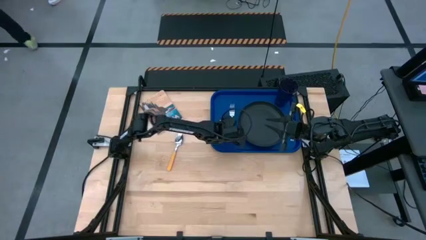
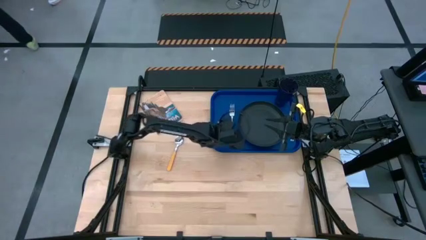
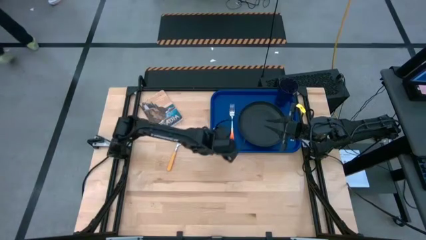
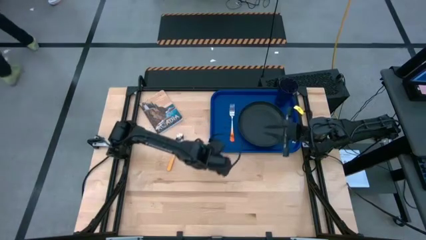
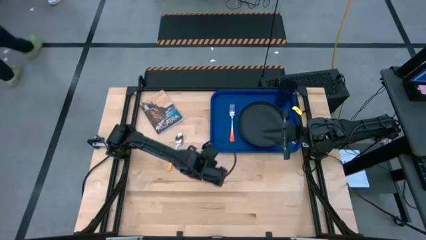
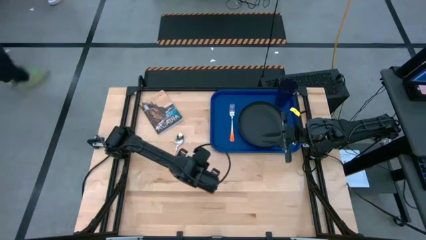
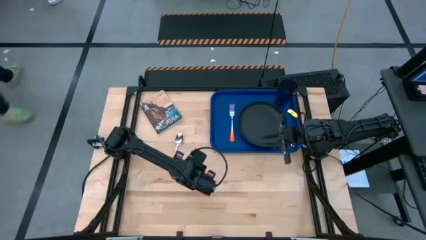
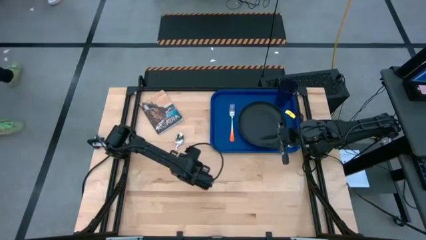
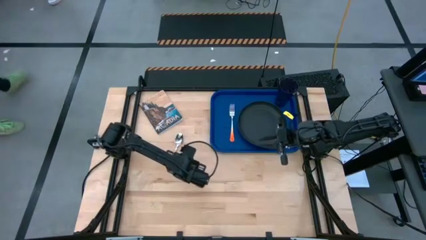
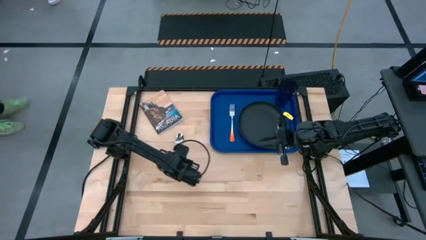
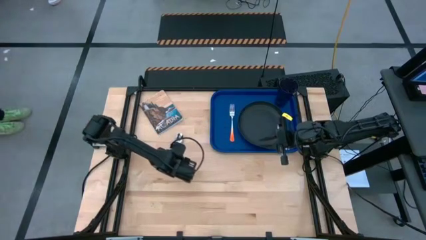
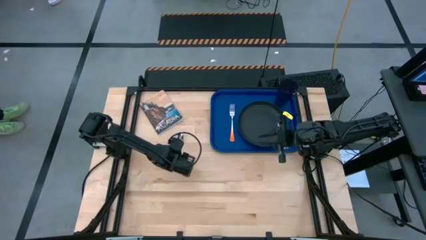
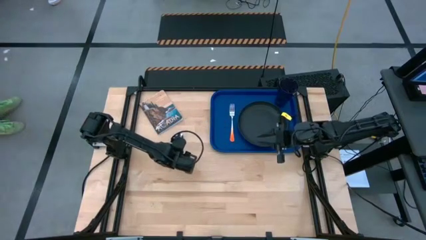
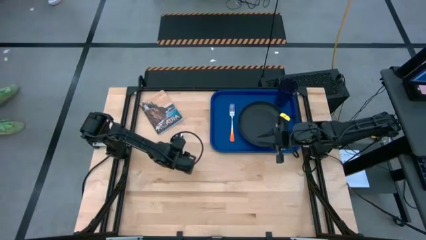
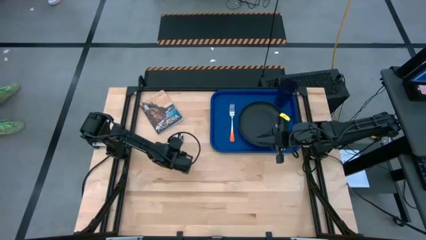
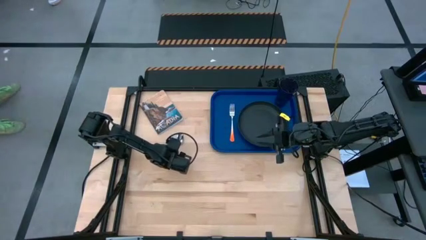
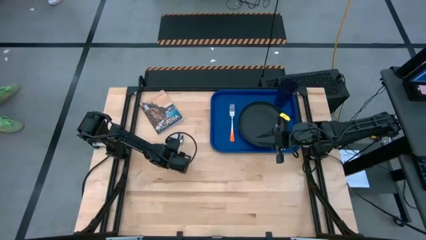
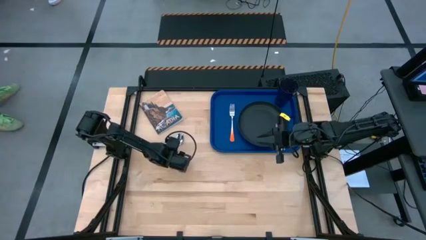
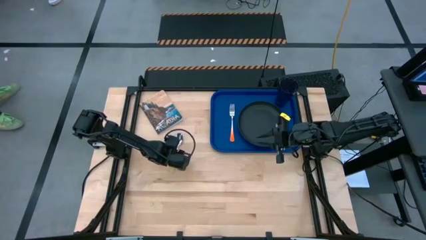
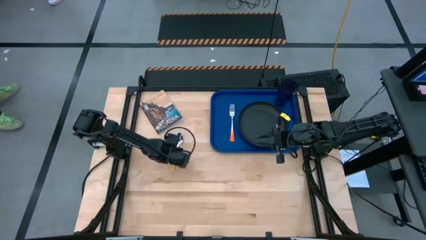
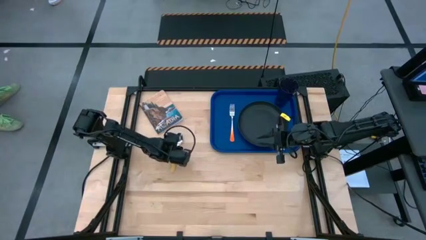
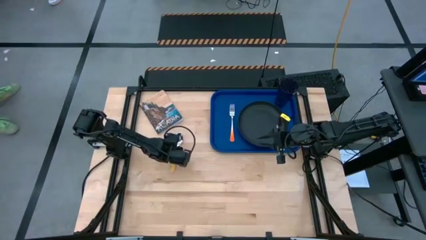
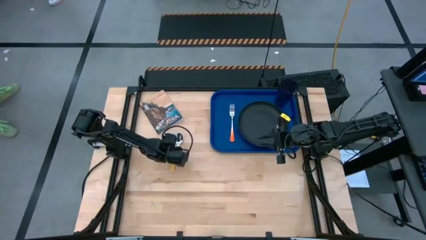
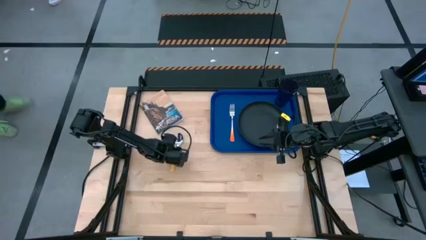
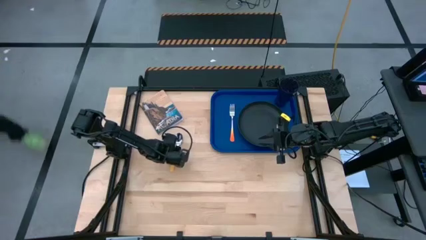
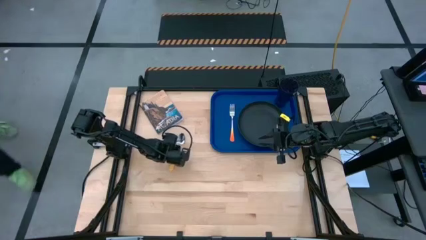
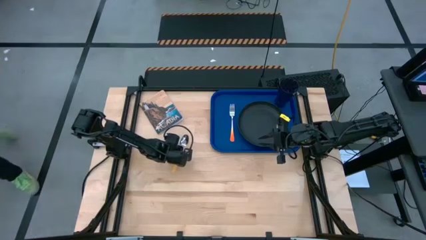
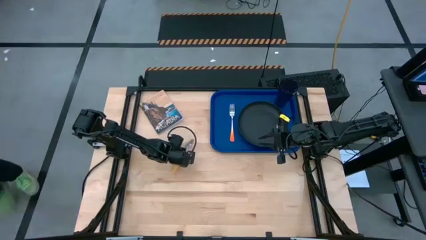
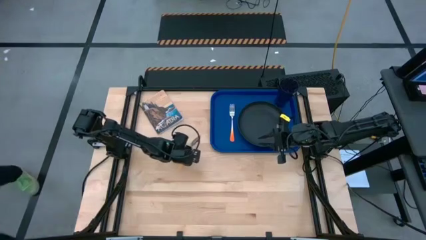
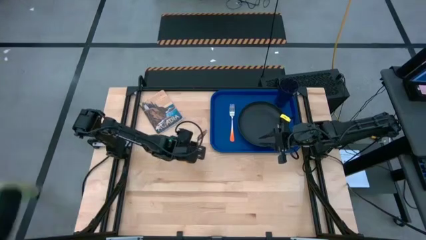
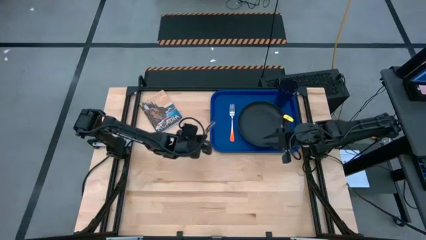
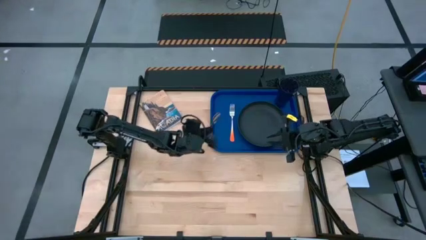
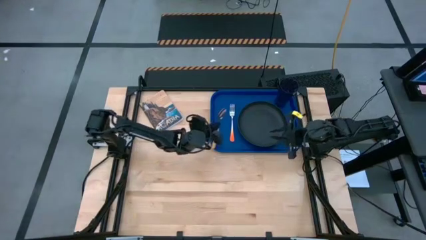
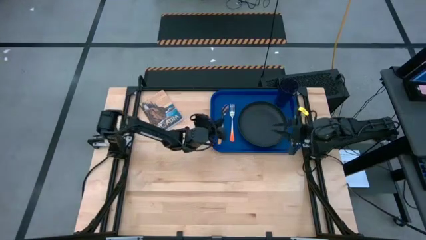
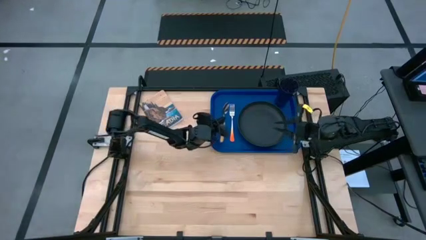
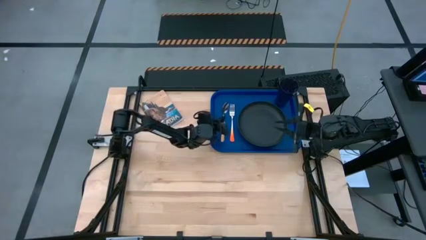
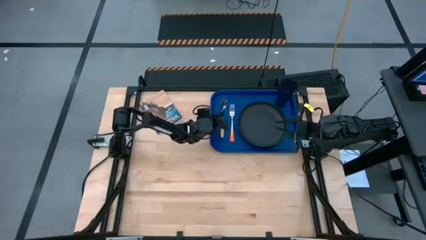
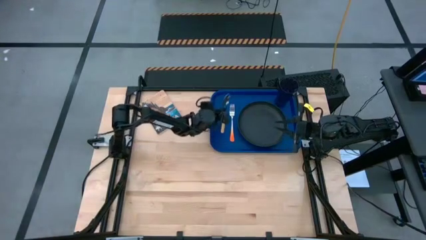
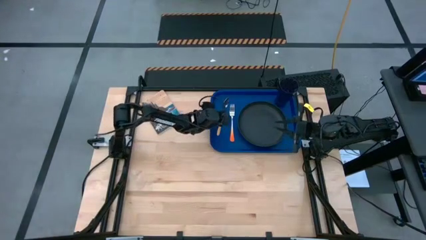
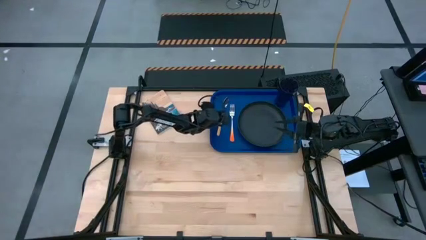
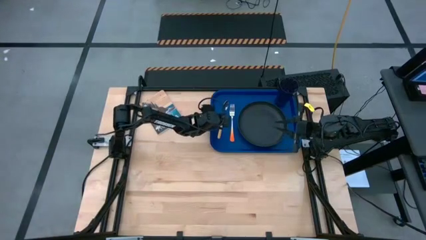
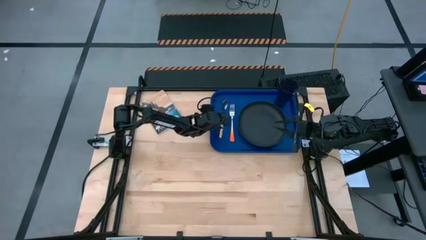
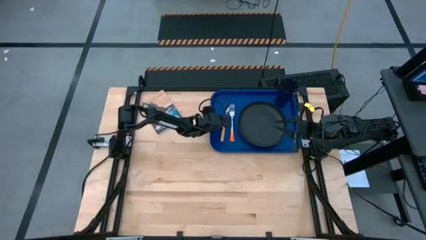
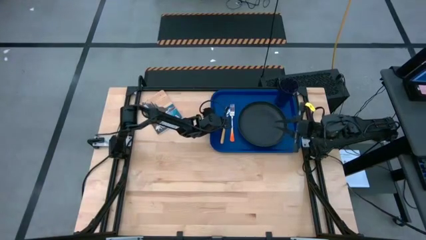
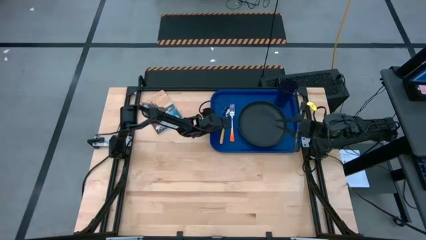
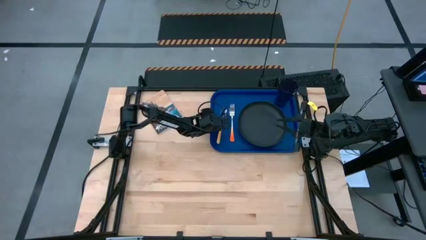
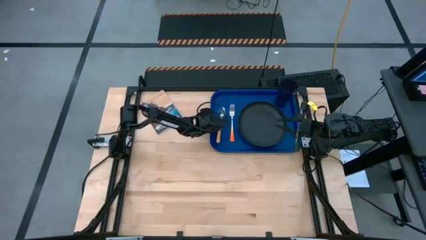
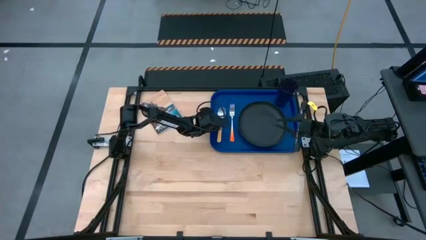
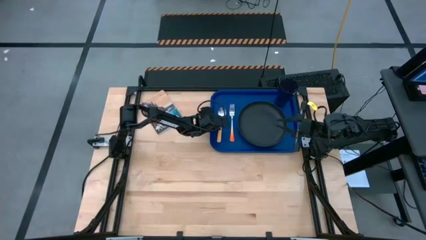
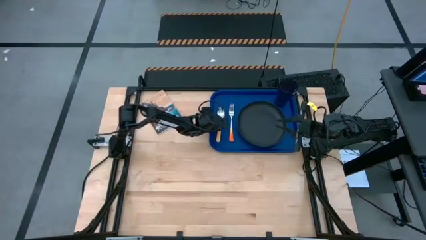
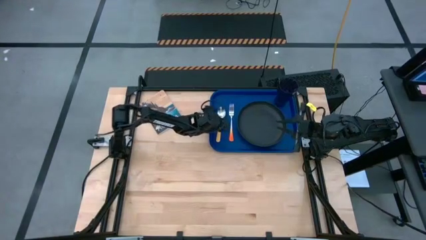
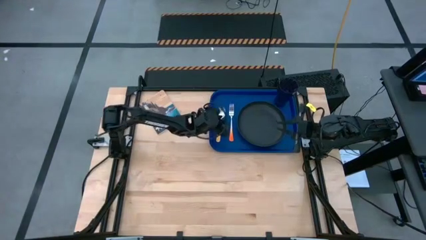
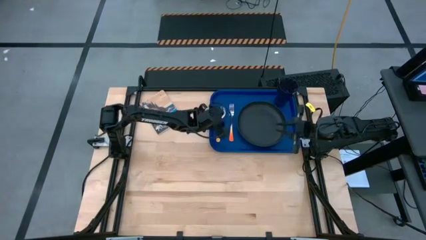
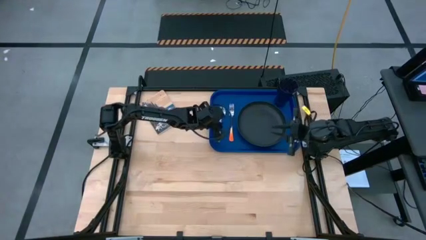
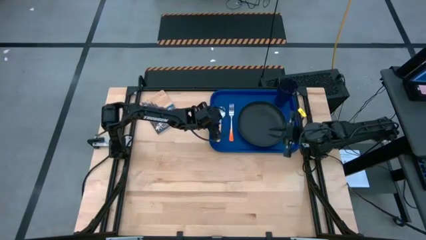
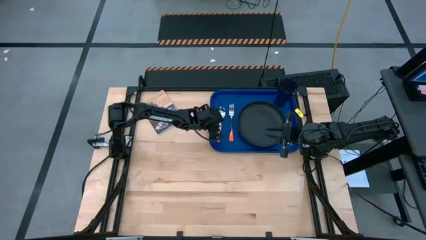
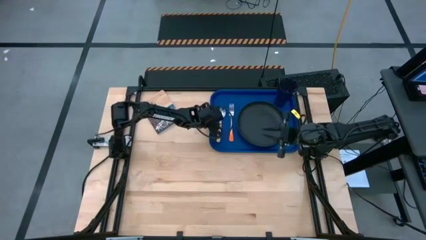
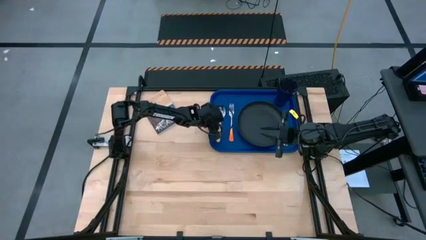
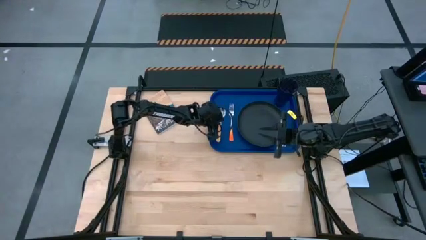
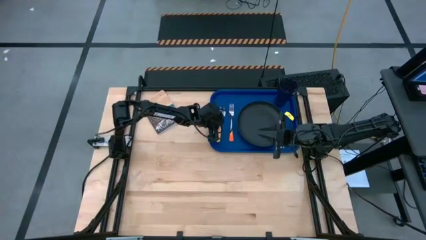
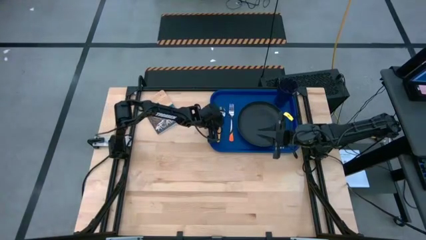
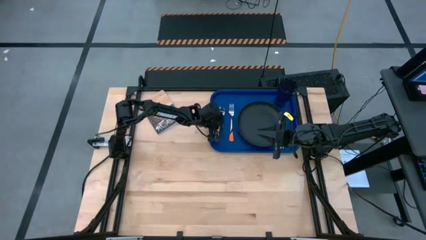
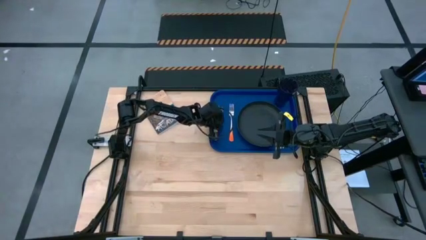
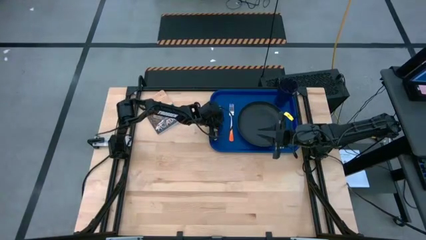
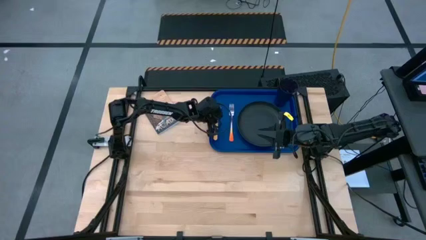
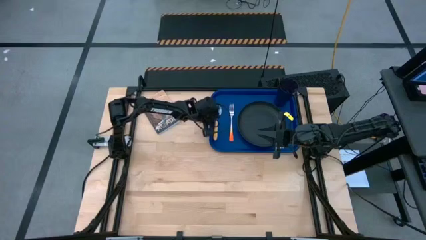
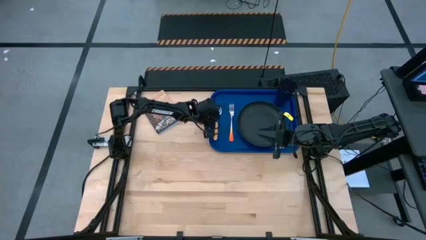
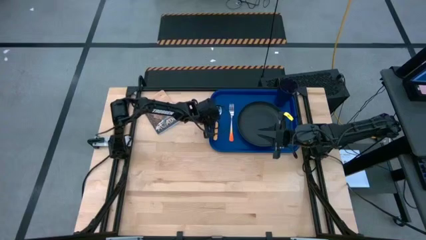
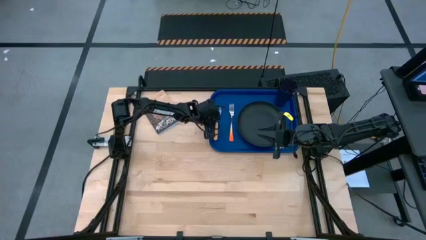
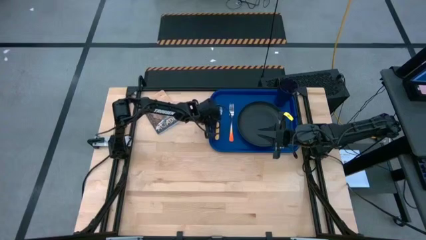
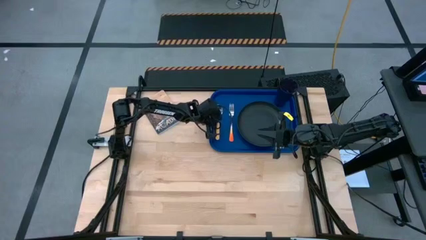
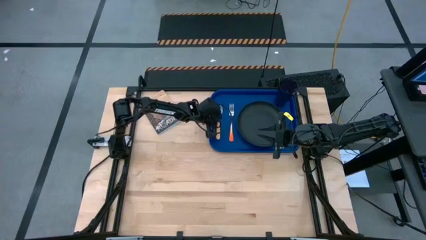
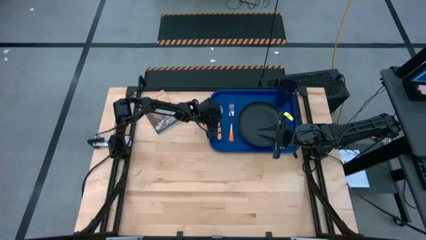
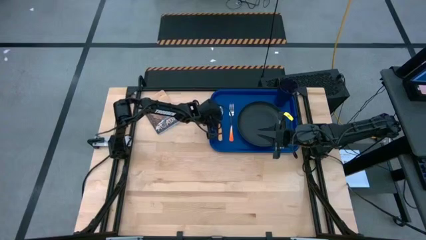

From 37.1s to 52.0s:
Task: Pick and place plate/cup/fork/spoon on tray
Put the yellow spoon on the blue tray to the left of the orange fork
